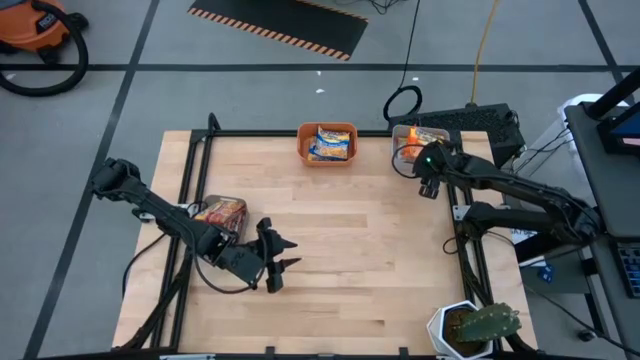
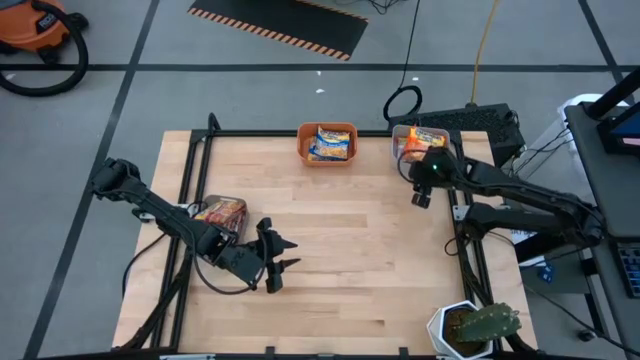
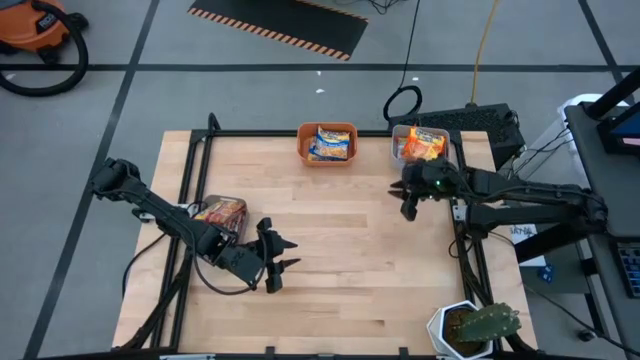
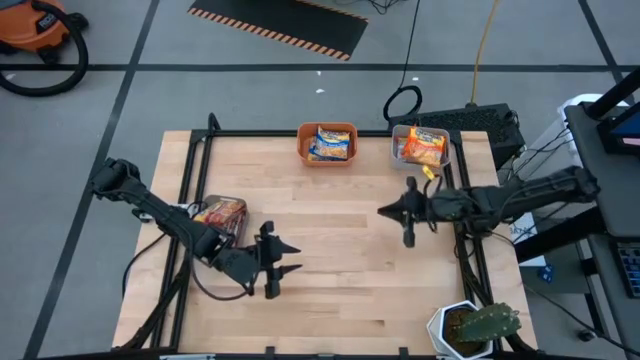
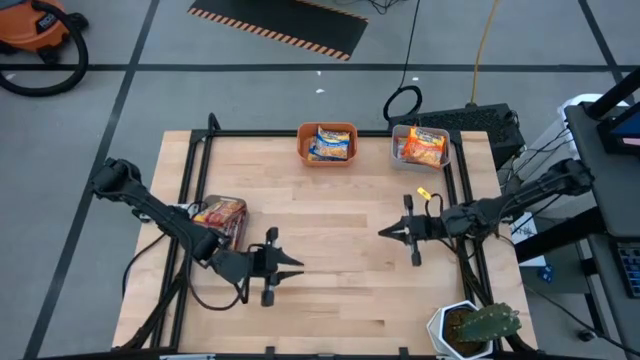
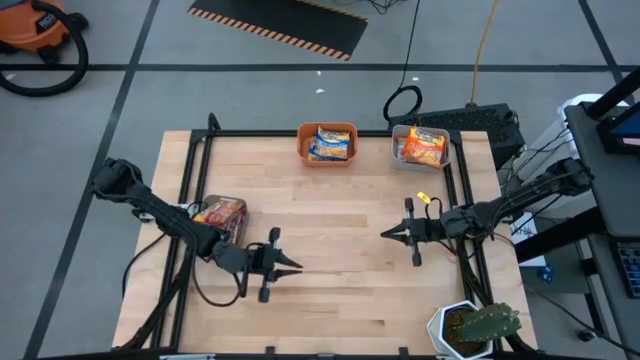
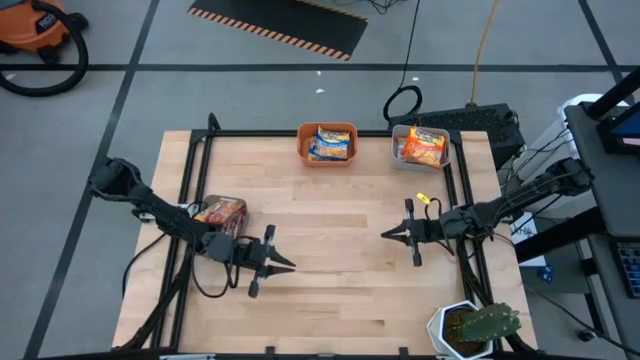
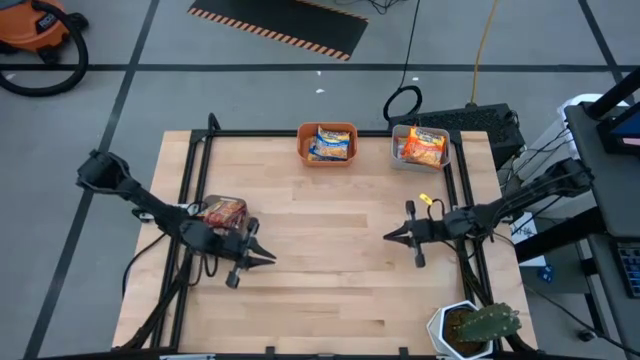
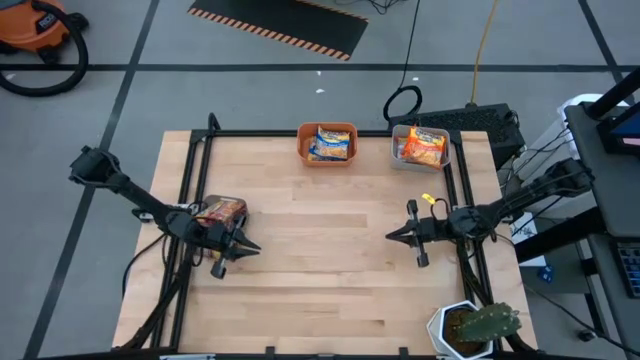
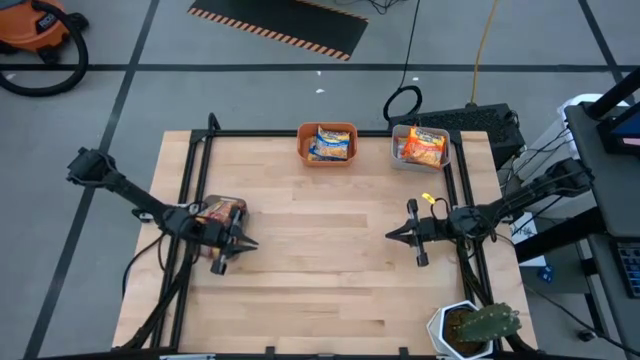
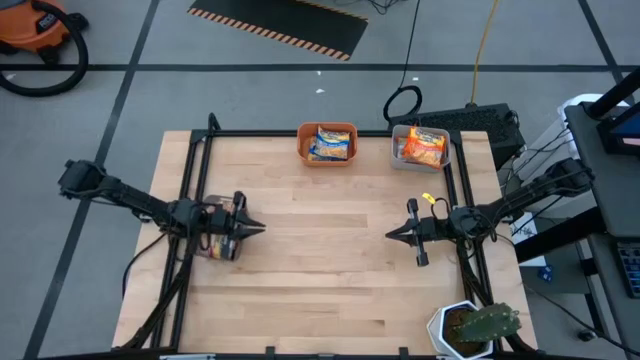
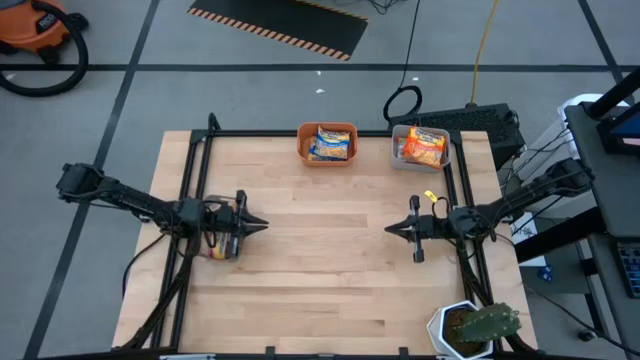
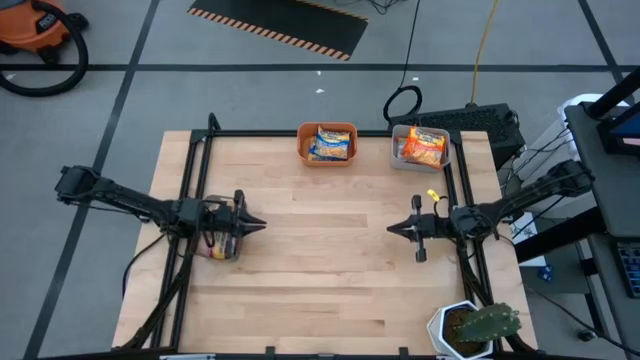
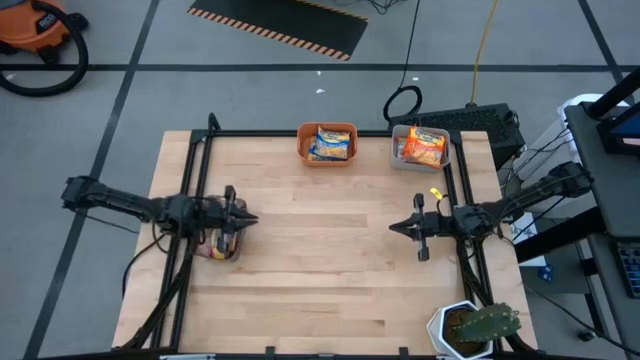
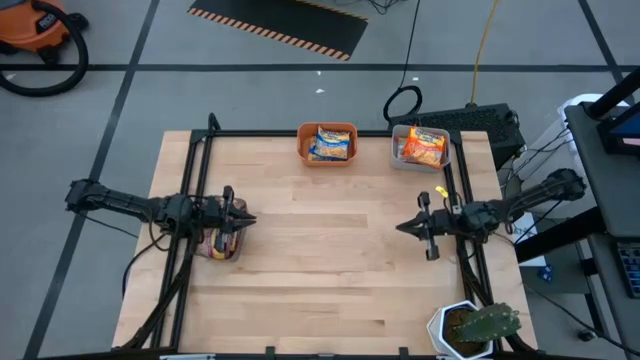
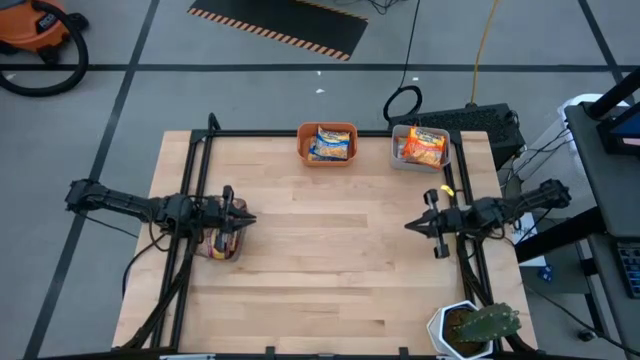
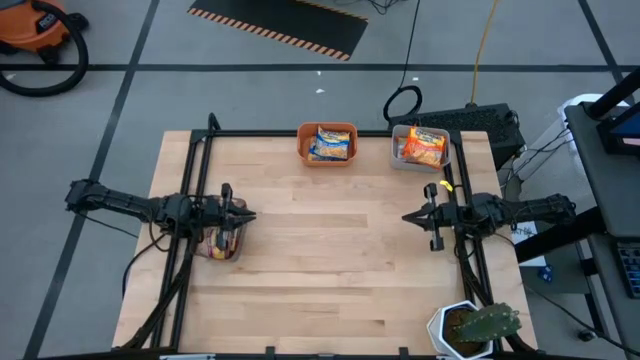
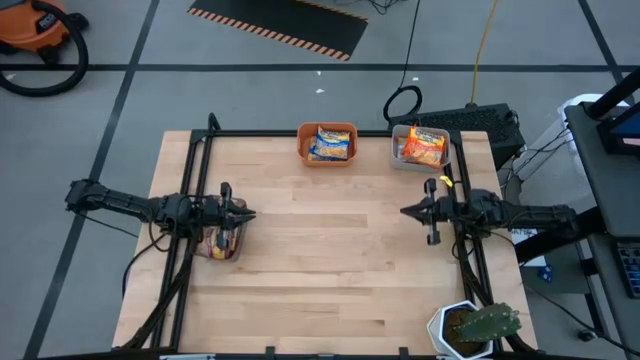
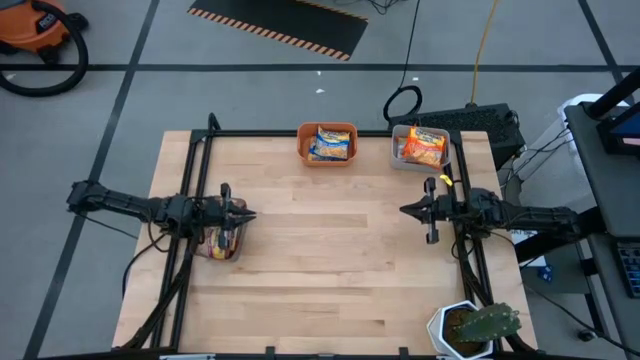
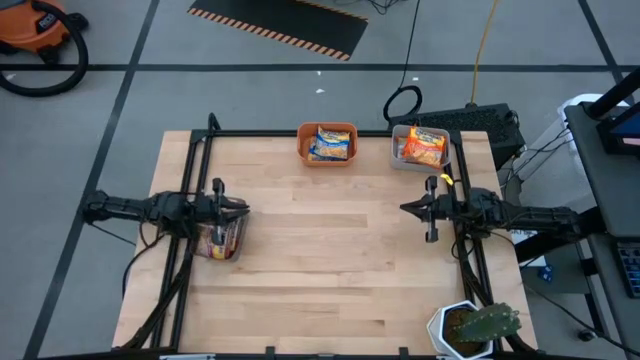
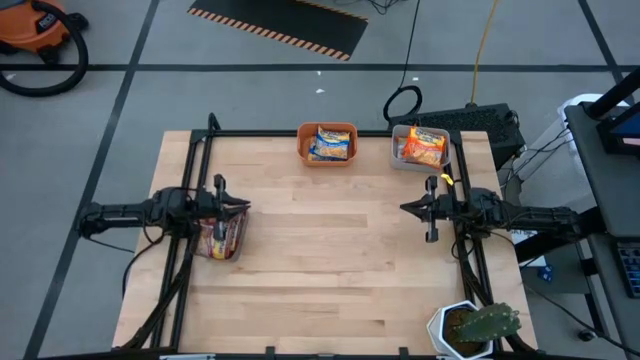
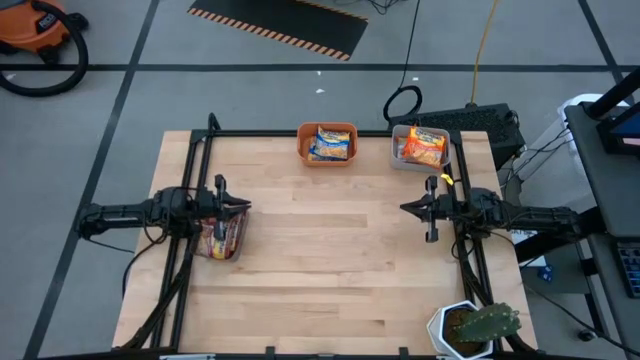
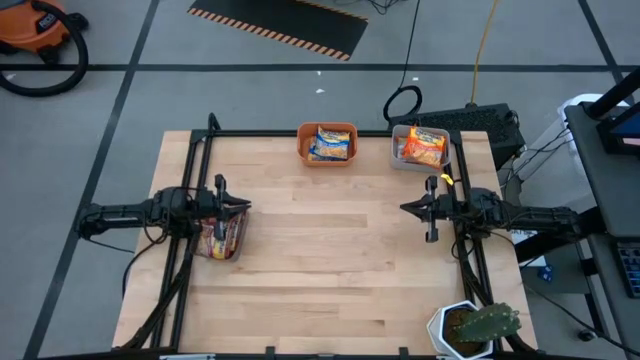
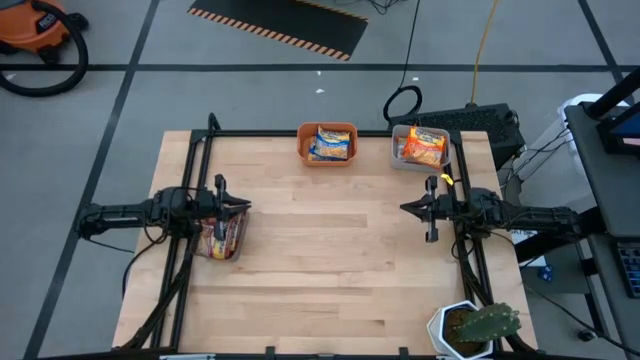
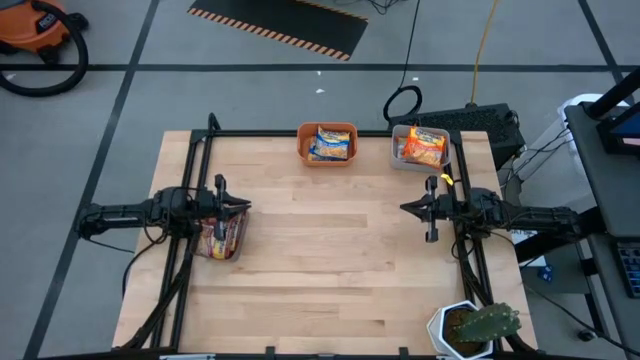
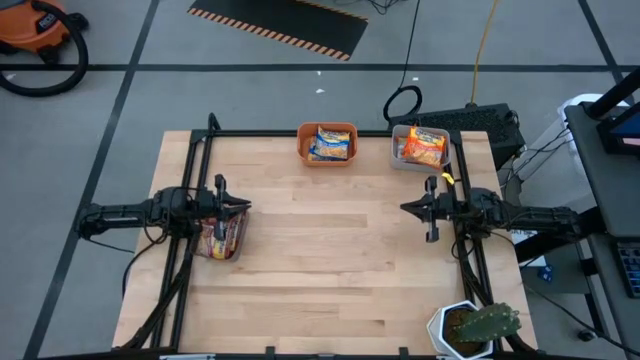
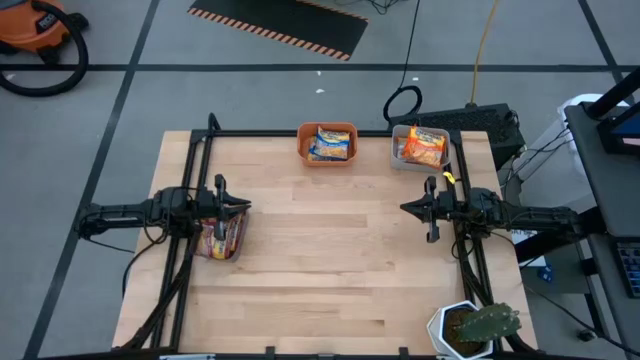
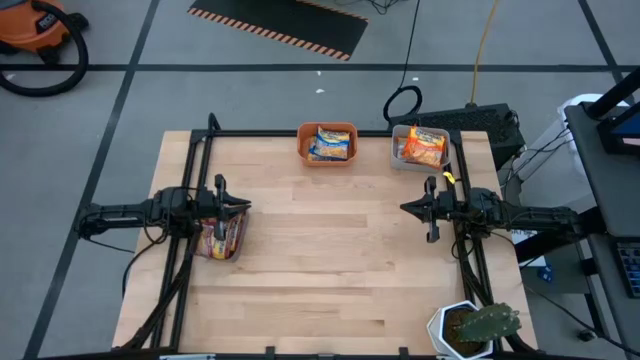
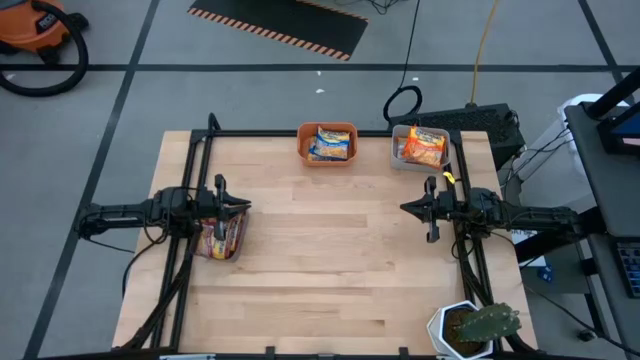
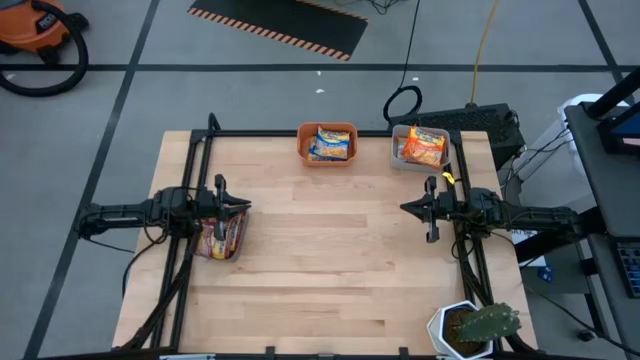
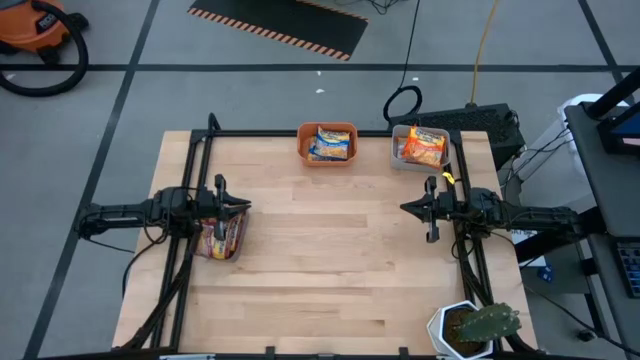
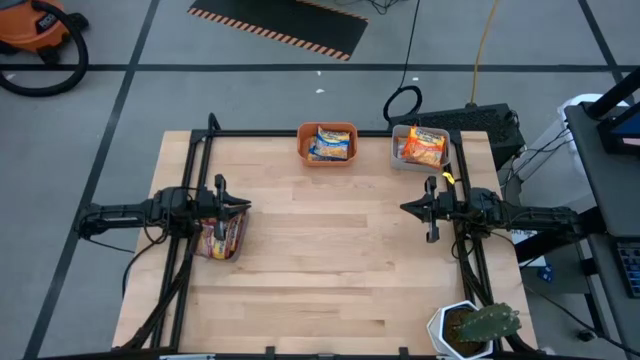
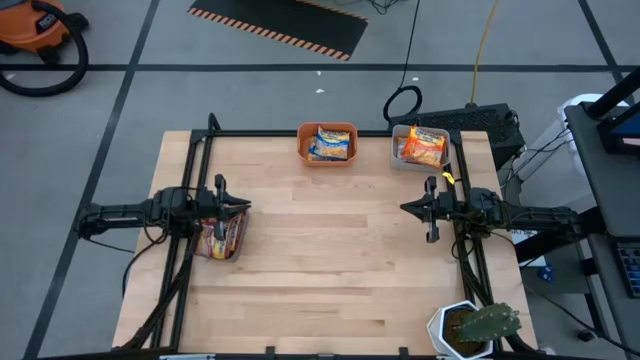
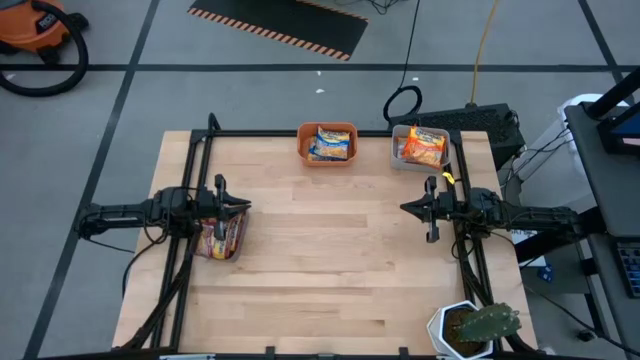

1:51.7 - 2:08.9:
Task: Sort Maruchan noodles
Return to Home Position

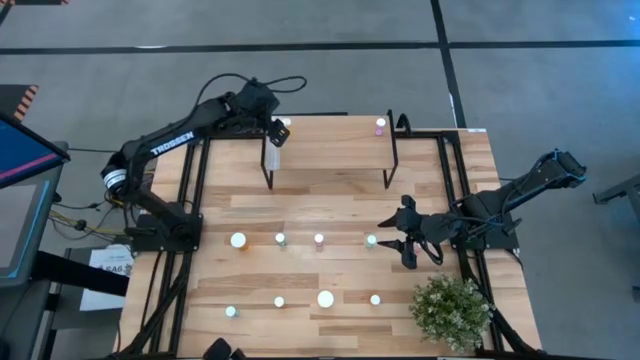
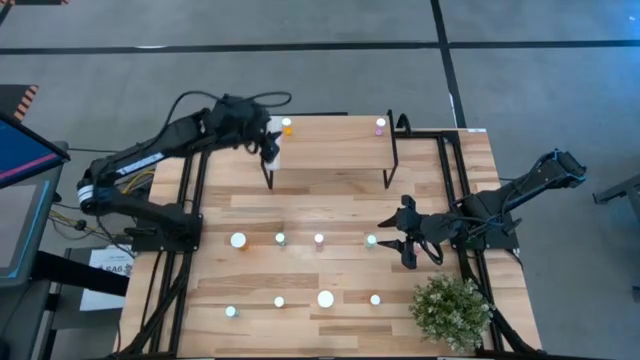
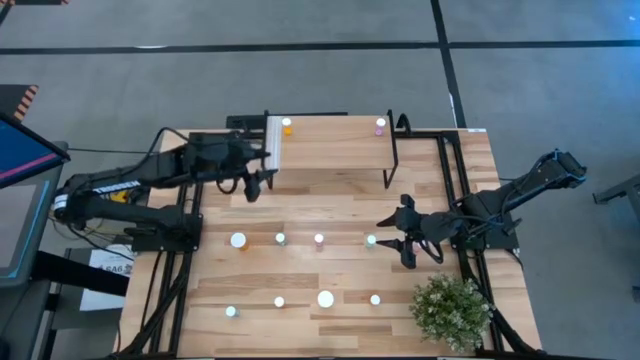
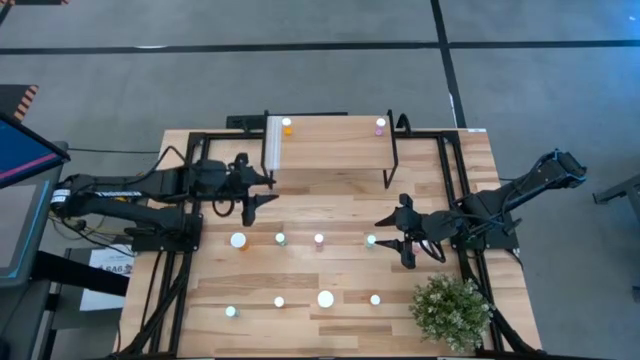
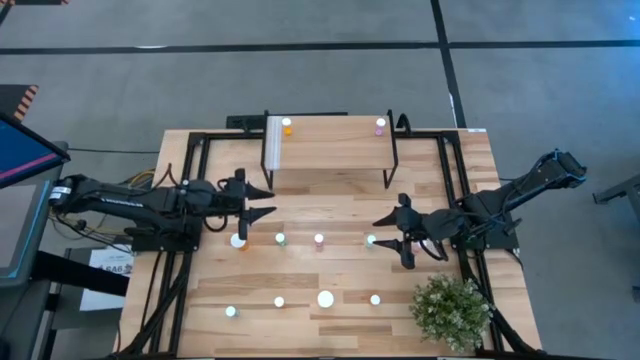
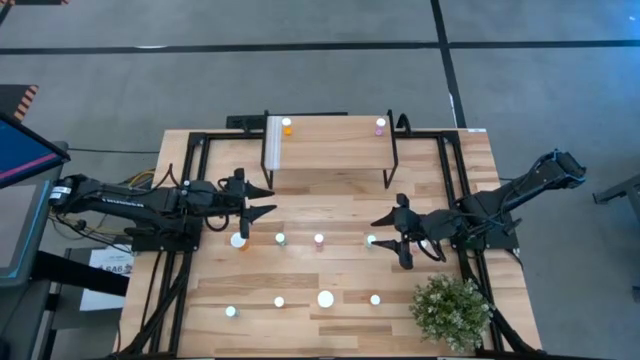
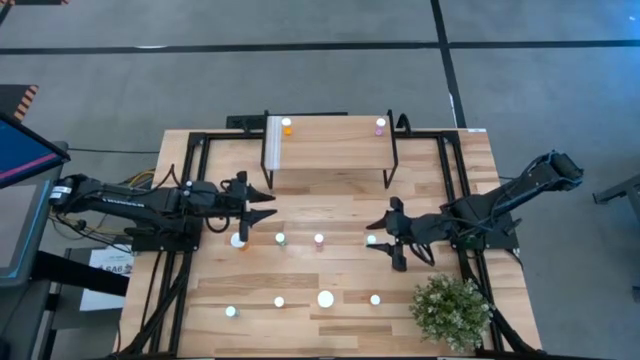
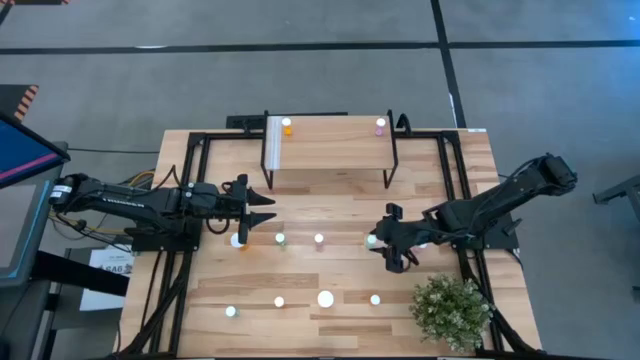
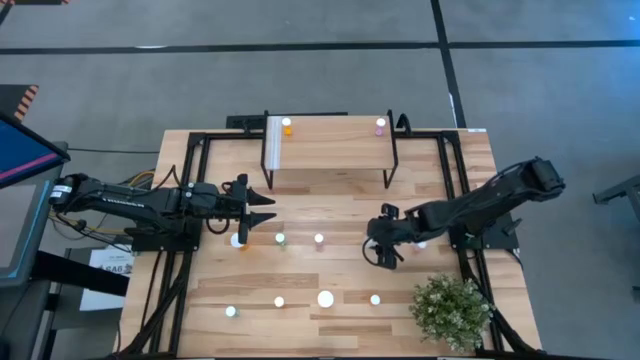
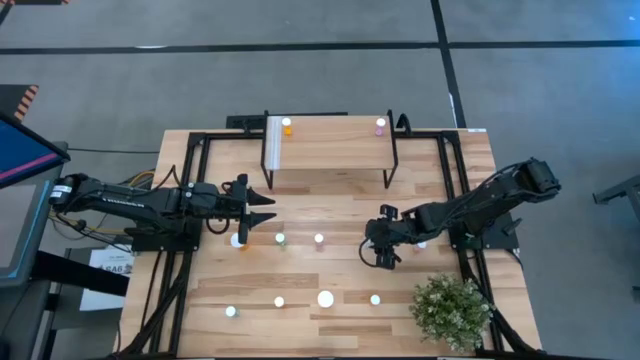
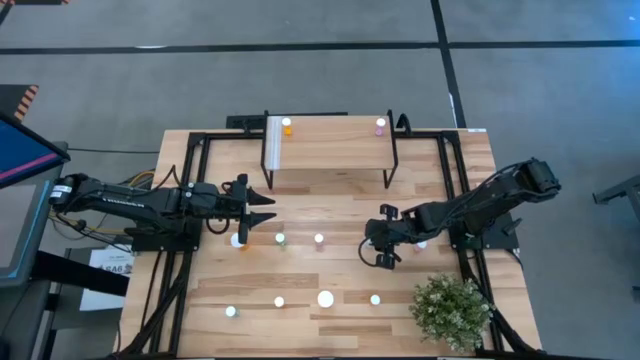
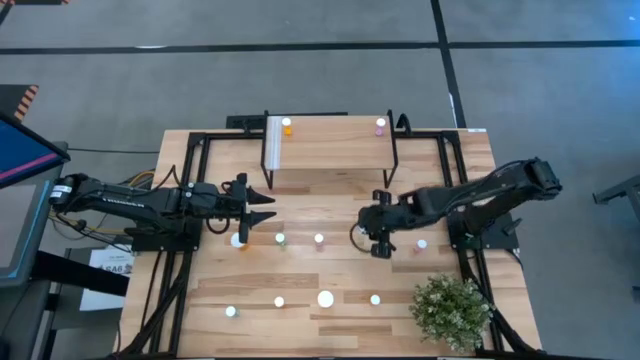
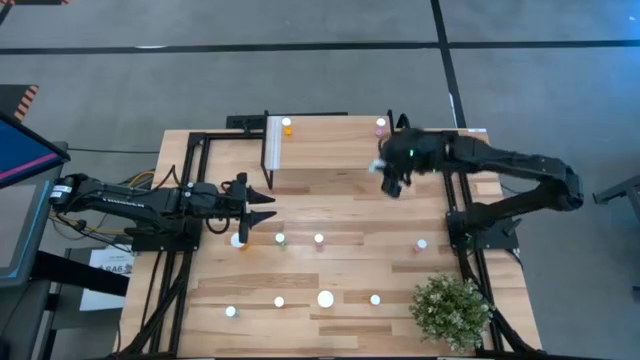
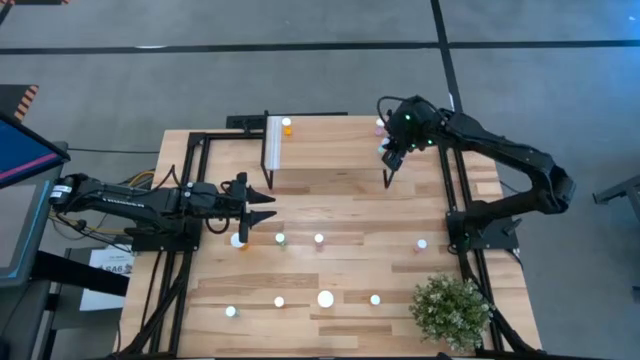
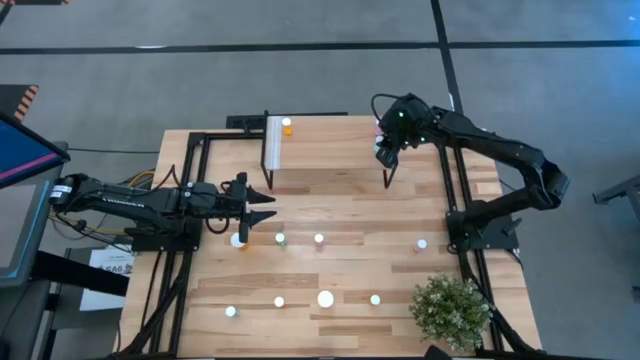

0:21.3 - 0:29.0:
Task: Pick and place medicine bottles onto shelf by color
Put the top right green pill bottle on the shelf
